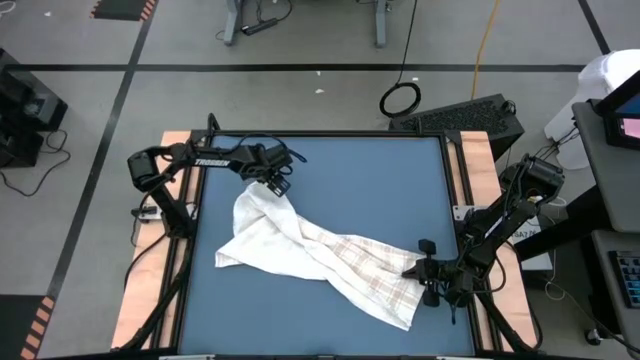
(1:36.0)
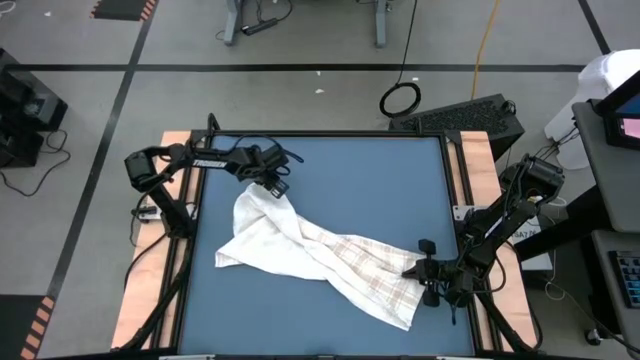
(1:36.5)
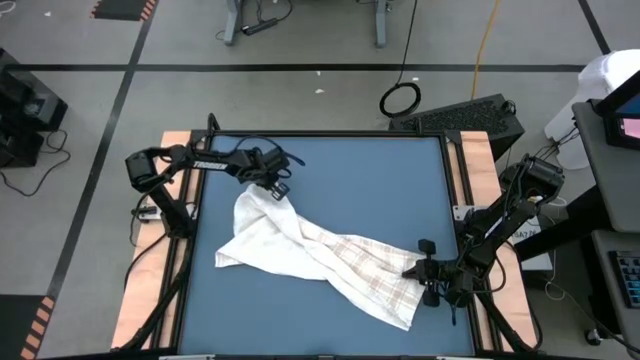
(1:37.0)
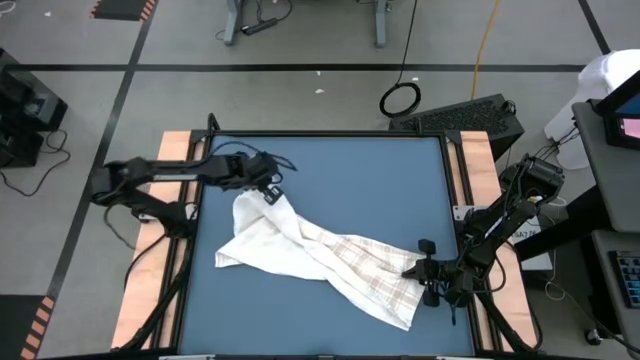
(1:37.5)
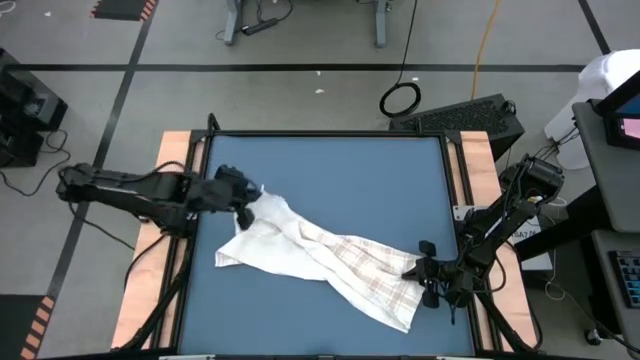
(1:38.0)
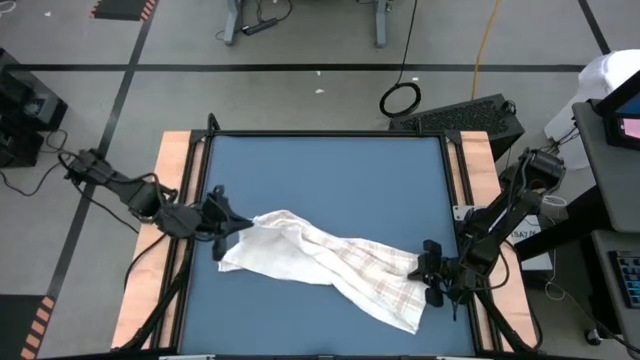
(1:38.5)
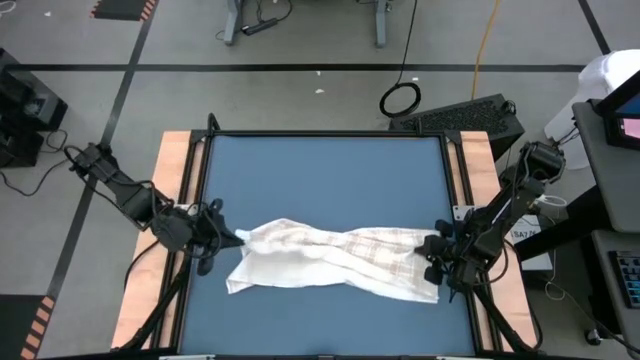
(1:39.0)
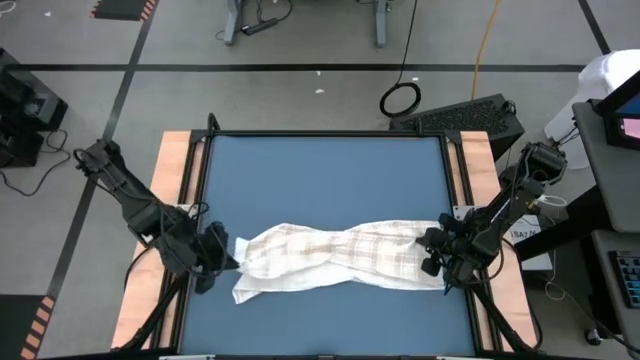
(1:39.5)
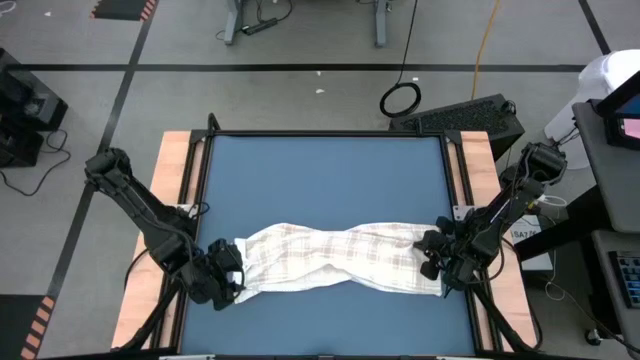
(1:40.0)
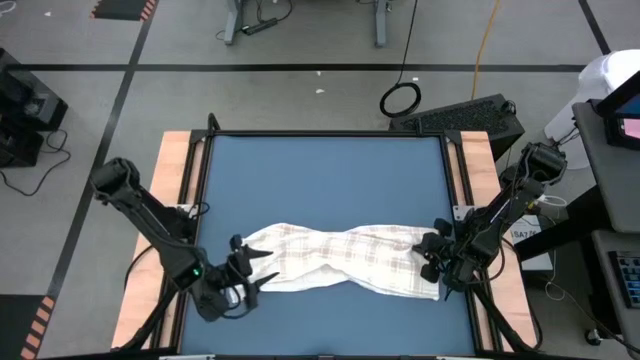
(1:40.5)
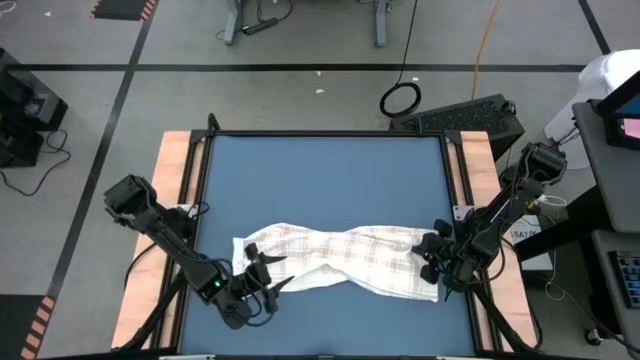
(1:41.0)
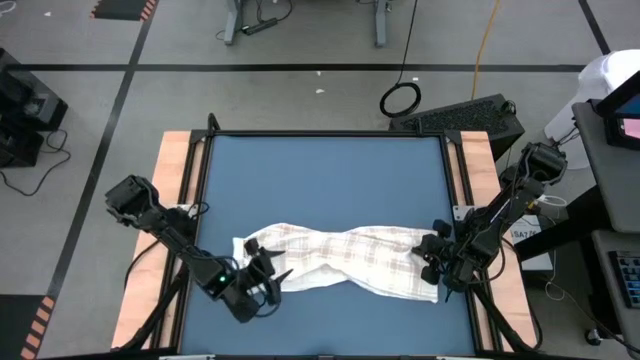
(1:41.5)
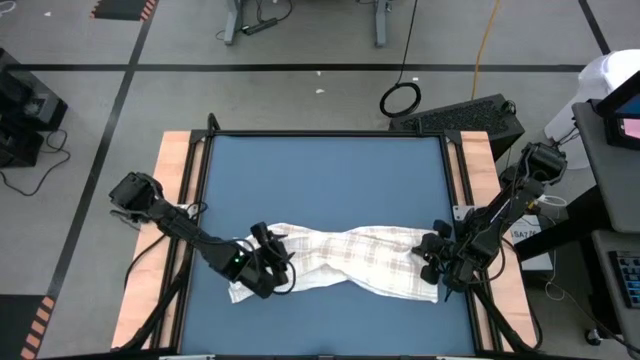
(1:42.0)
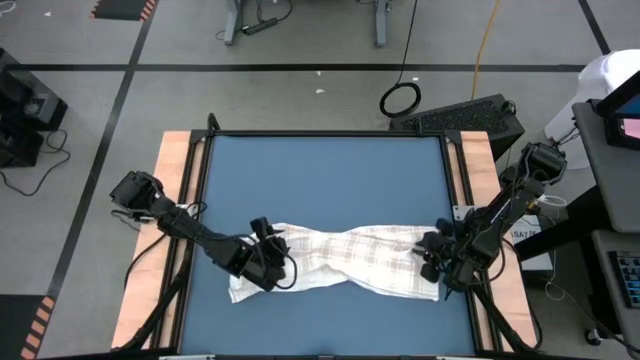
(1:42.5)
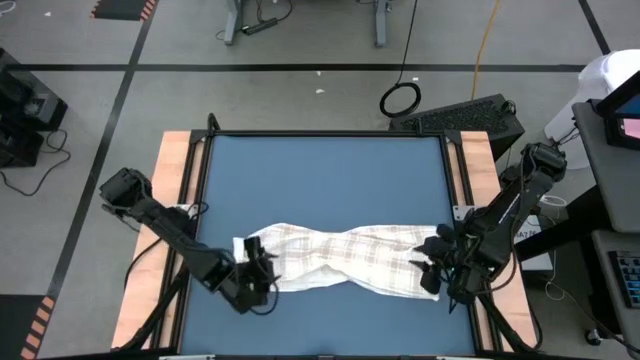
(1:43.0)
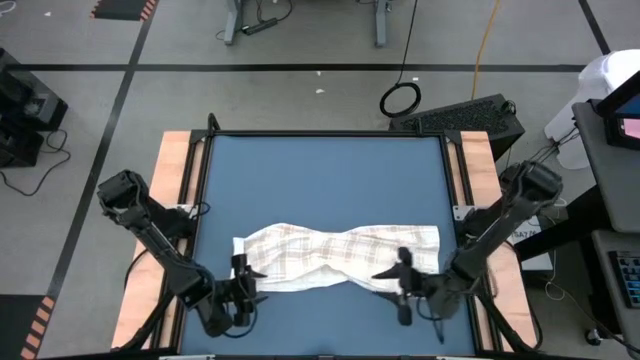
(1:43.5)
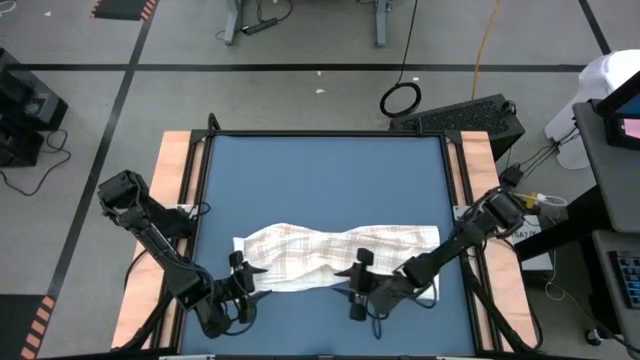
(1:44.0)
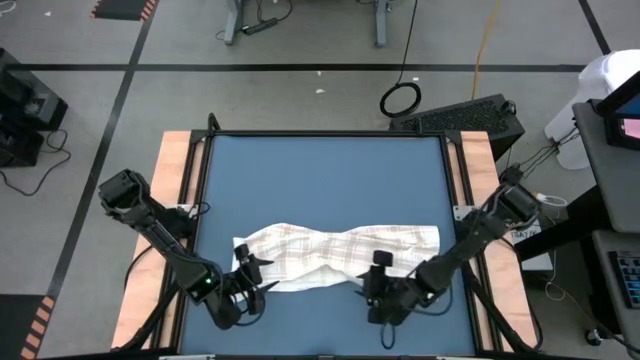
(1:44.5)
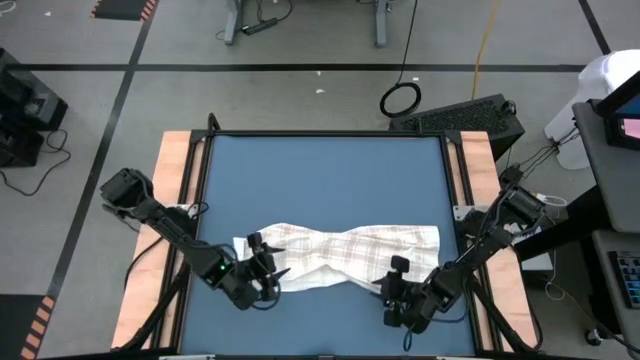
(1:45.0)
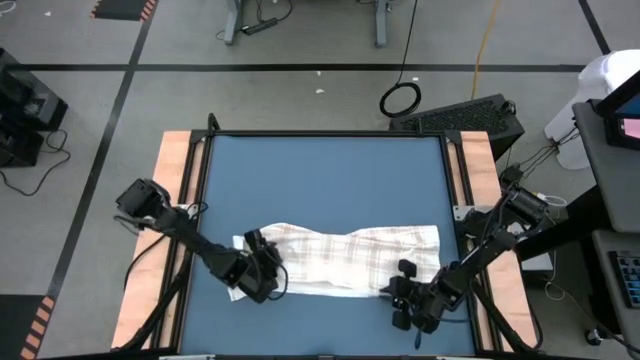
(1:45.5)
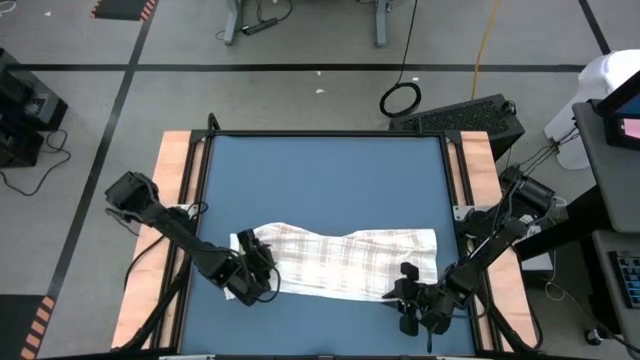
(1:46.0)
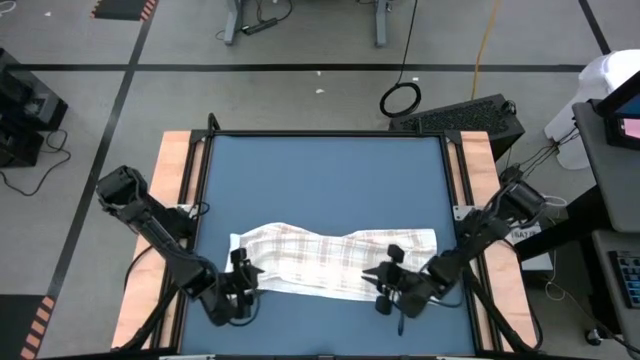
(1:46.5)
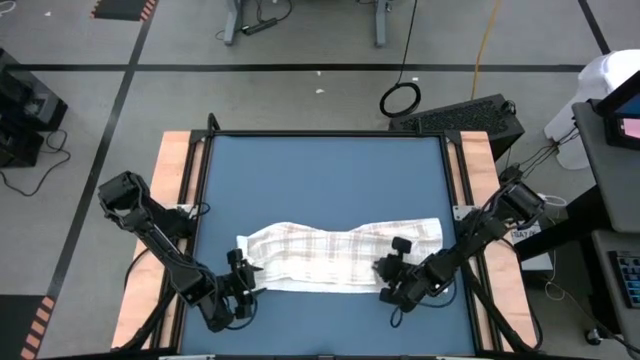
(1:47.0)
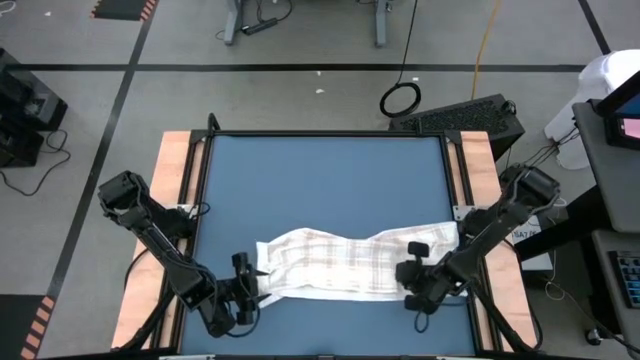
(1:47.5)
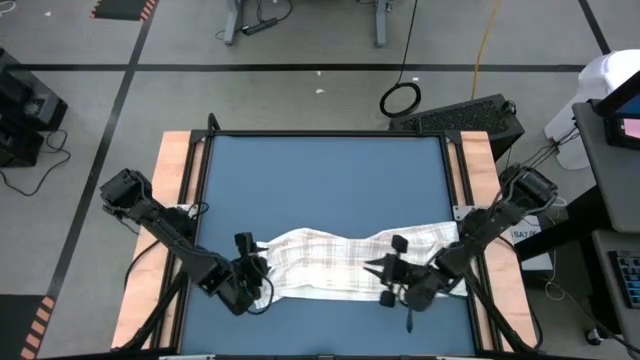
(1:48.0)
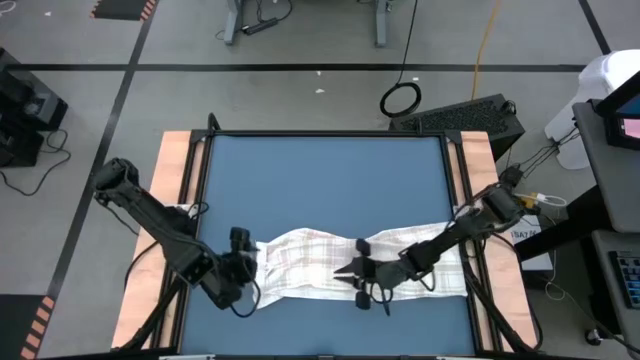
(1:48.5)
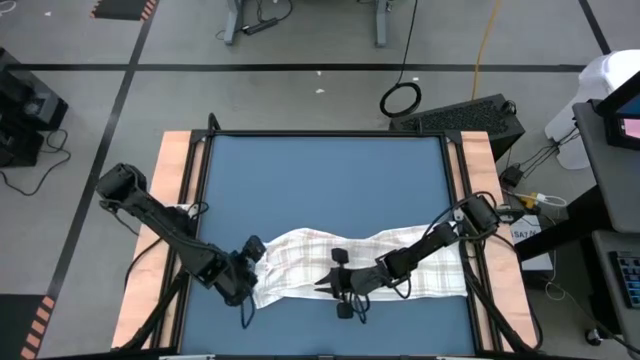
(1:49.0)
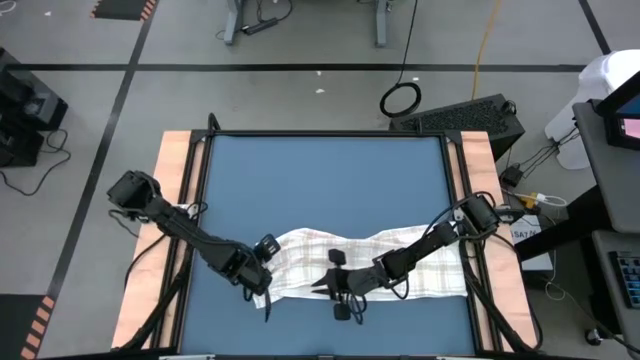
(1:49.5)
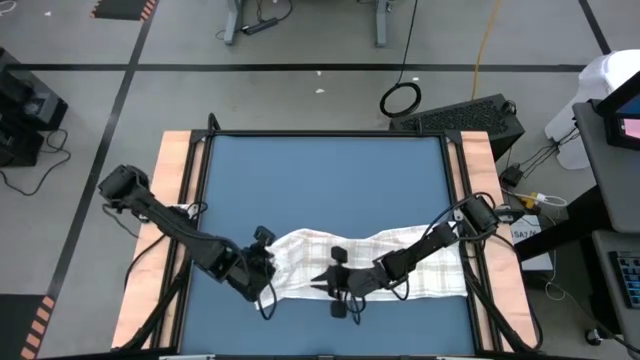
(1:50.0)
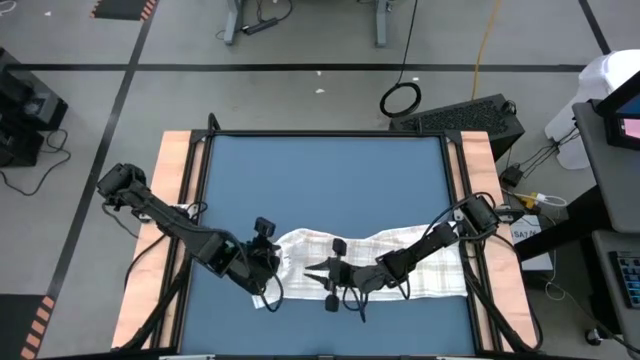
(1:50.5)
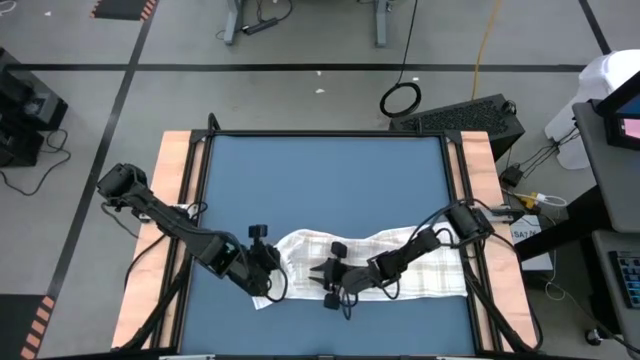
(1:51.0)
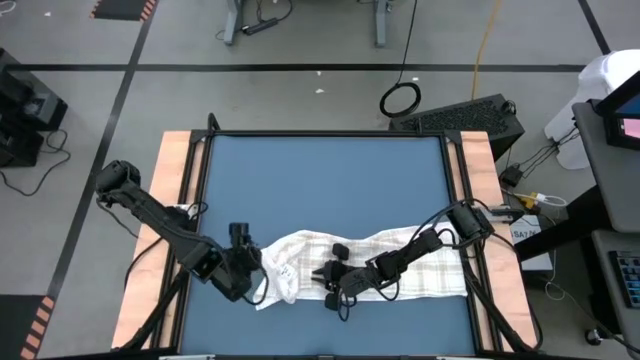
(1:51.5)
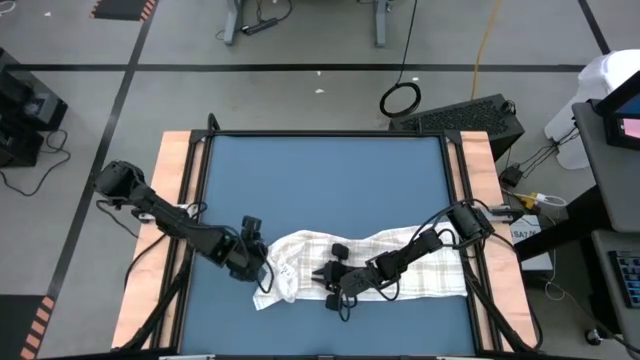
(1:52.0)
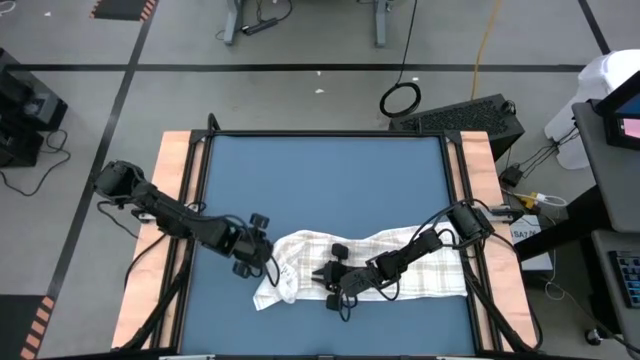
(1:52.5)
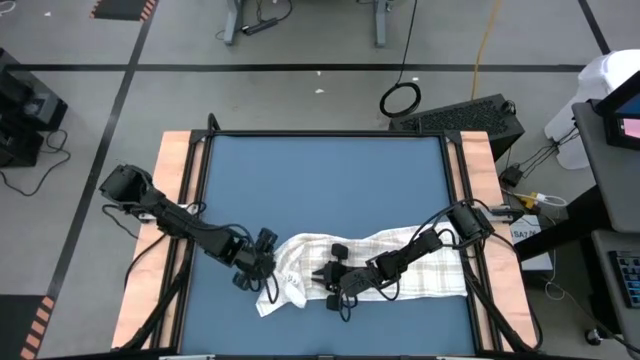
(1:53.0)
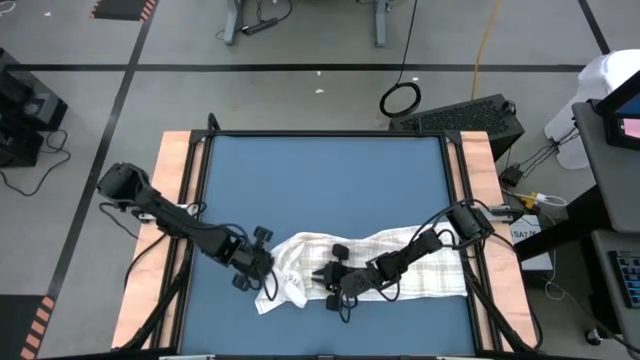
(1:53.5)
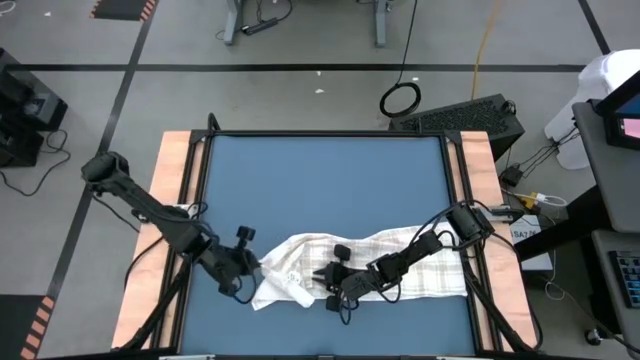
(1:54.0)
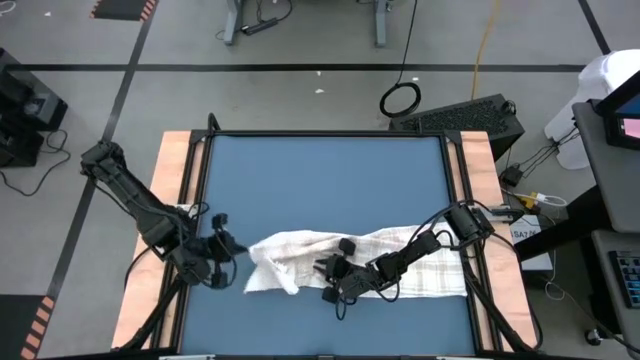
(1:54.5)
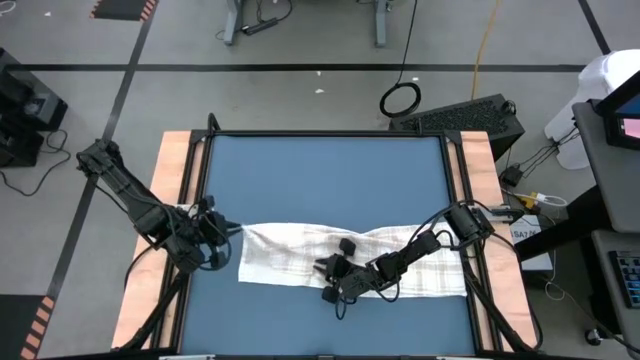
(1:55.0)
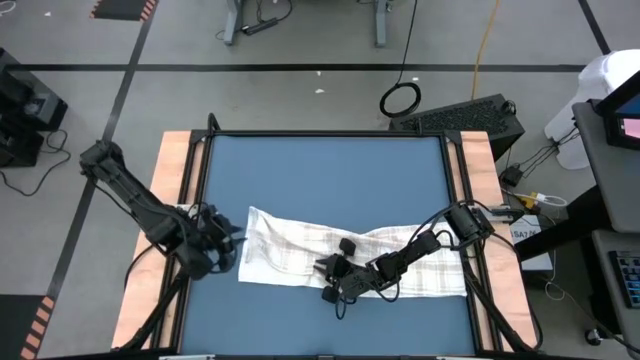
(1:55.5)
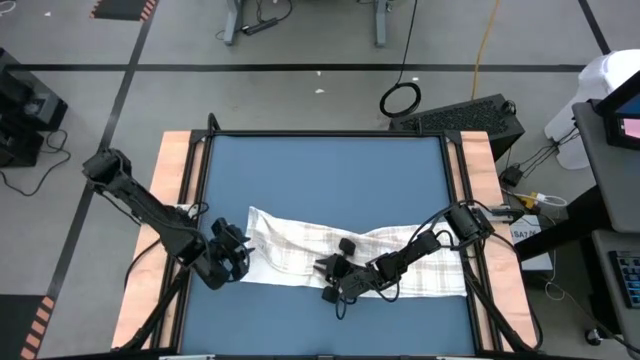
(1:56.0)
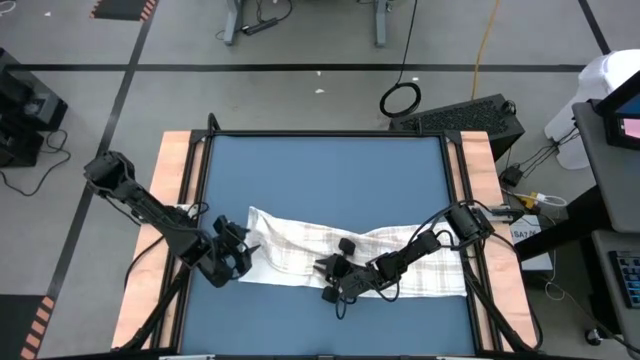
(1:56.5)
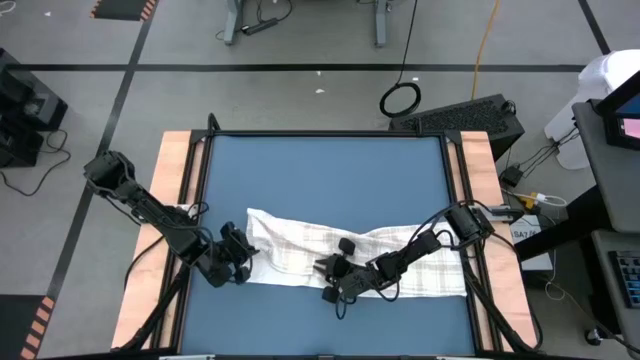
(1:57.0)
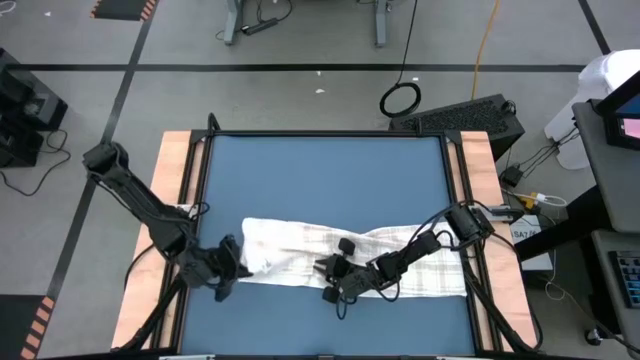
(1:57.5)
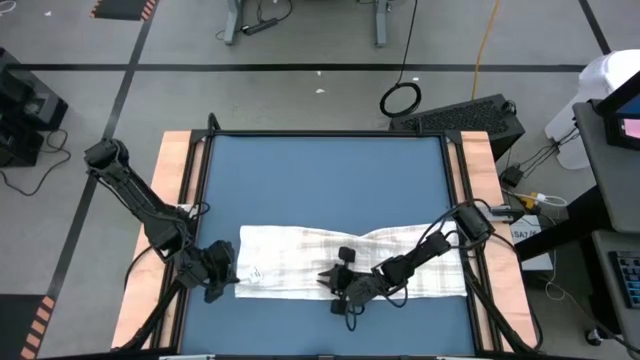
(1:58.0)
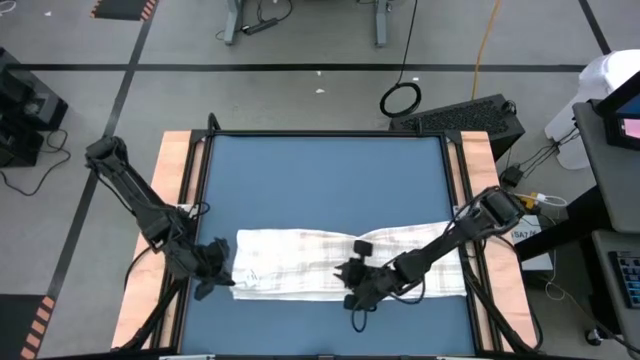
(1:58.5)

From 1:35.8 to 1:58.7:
Task: Roll towel into tight, uniform cylinder
Roll the white towel
